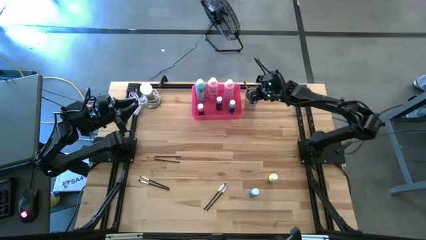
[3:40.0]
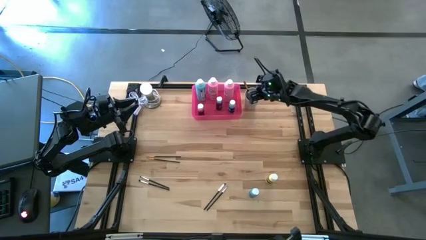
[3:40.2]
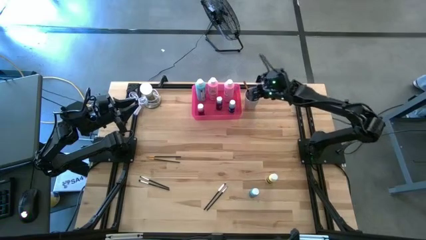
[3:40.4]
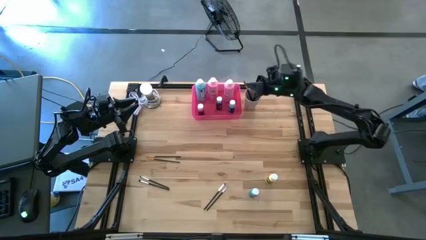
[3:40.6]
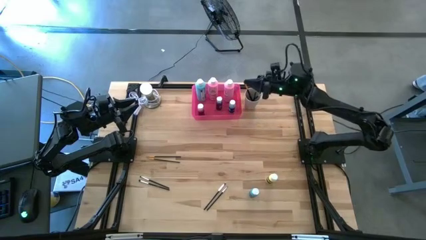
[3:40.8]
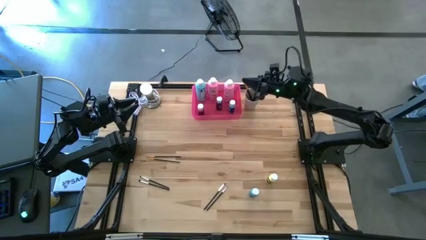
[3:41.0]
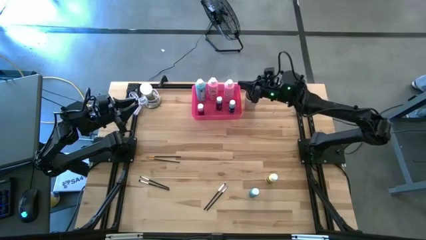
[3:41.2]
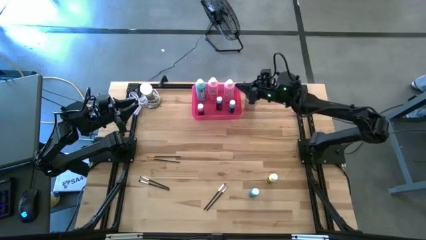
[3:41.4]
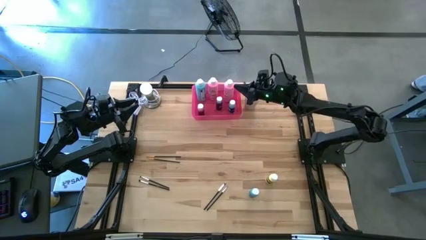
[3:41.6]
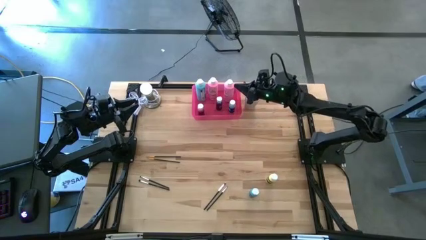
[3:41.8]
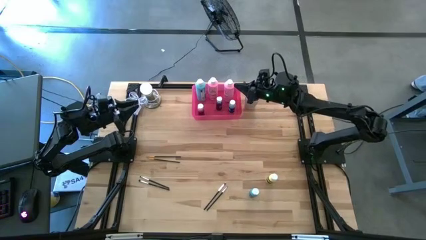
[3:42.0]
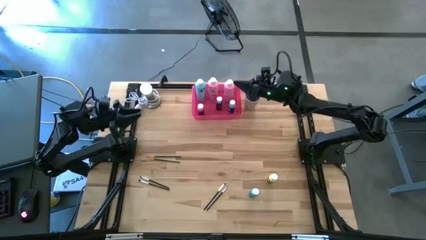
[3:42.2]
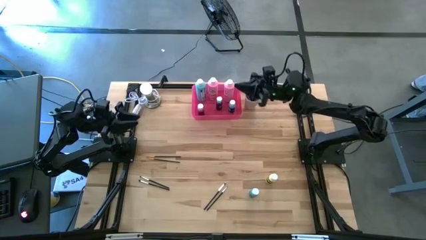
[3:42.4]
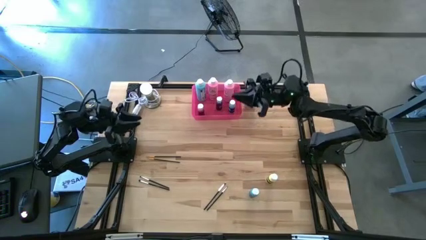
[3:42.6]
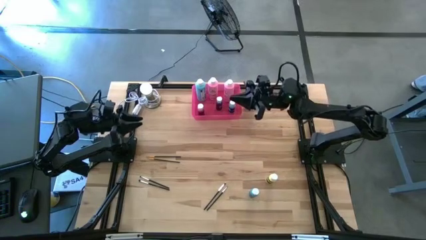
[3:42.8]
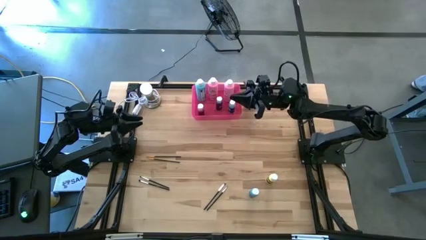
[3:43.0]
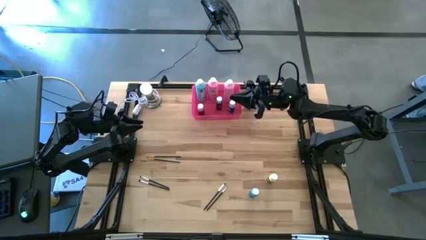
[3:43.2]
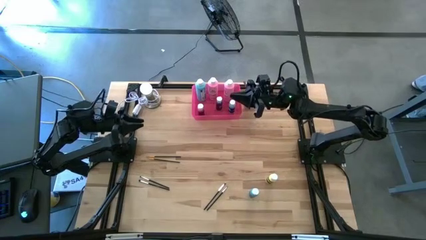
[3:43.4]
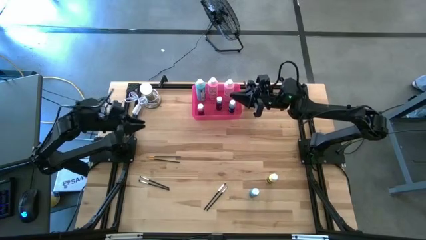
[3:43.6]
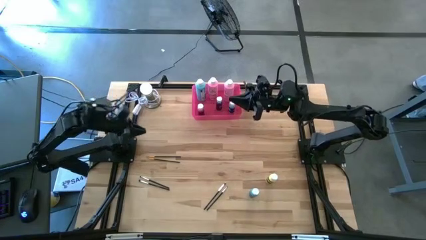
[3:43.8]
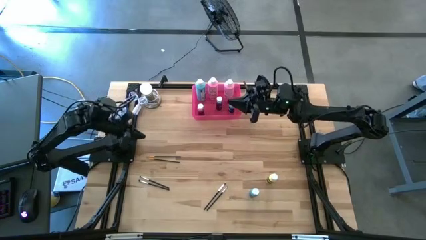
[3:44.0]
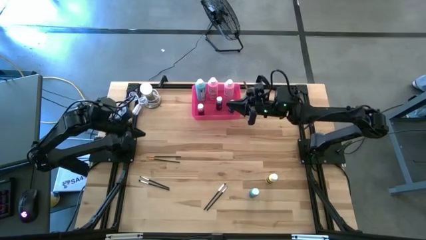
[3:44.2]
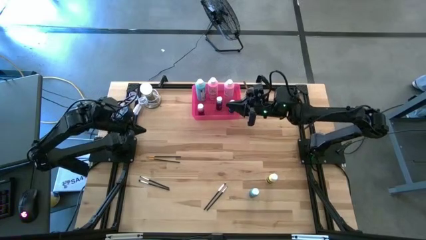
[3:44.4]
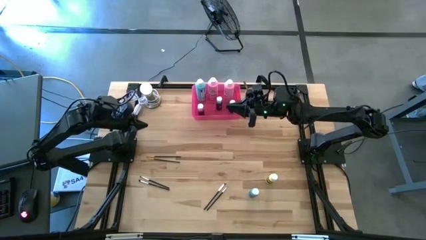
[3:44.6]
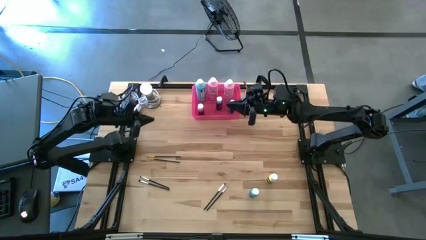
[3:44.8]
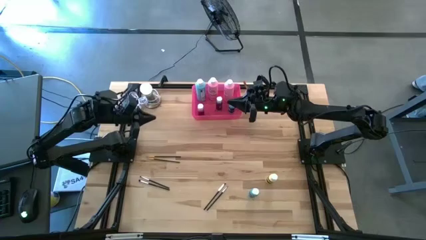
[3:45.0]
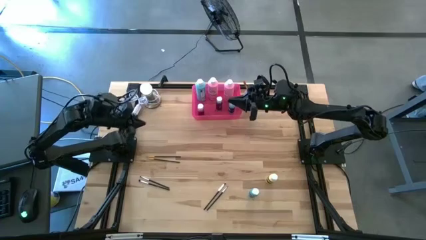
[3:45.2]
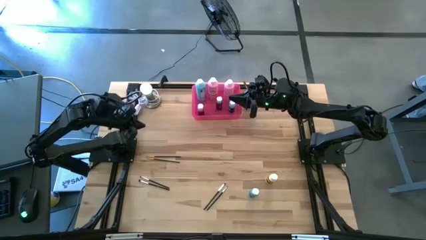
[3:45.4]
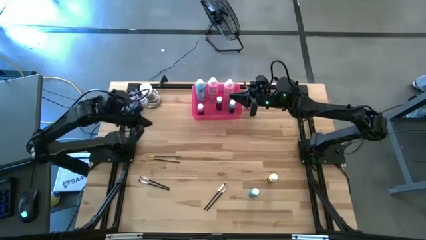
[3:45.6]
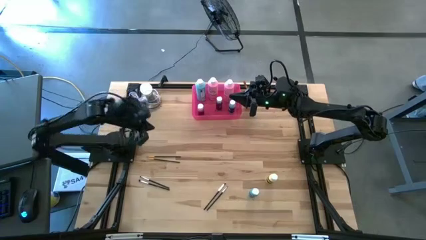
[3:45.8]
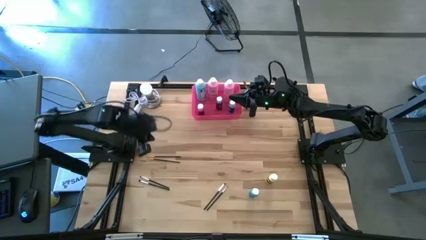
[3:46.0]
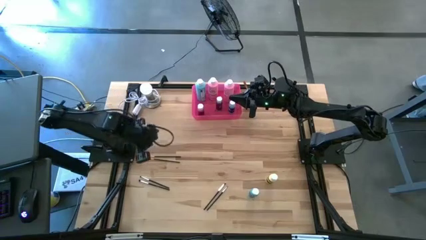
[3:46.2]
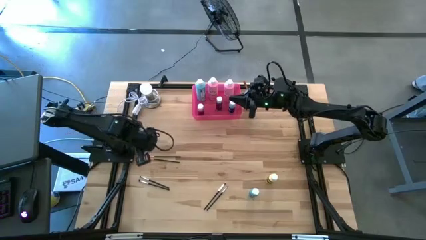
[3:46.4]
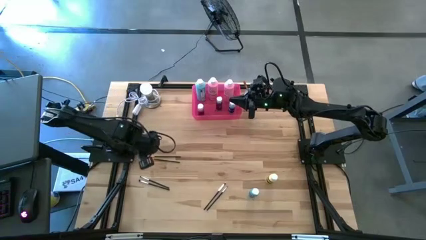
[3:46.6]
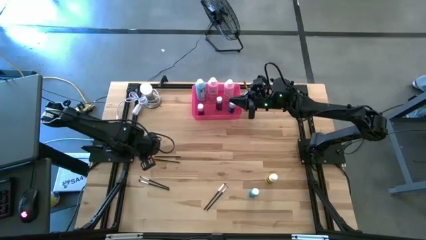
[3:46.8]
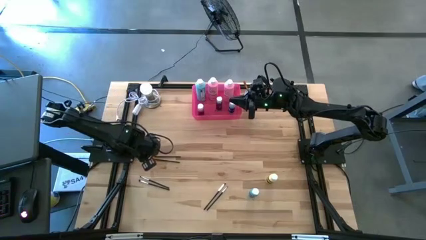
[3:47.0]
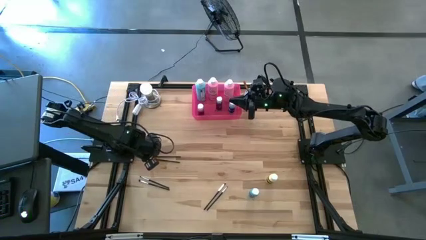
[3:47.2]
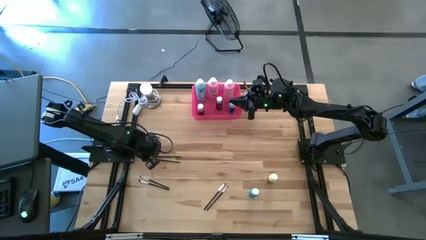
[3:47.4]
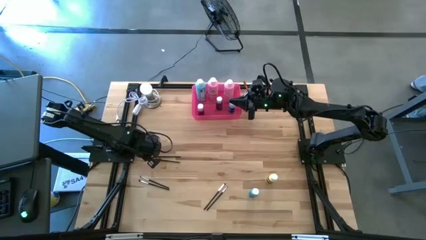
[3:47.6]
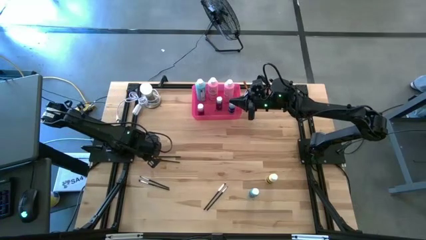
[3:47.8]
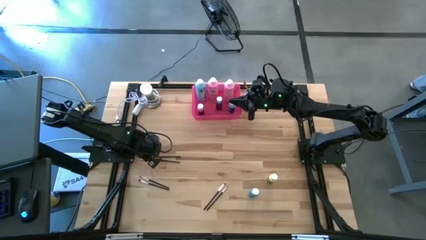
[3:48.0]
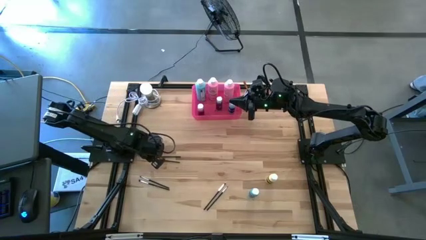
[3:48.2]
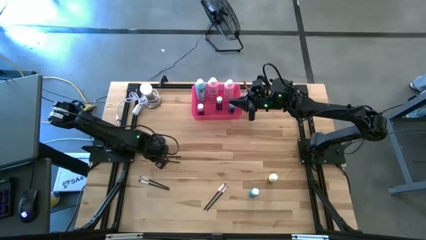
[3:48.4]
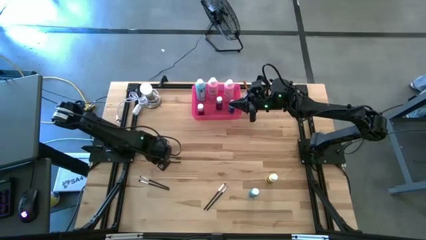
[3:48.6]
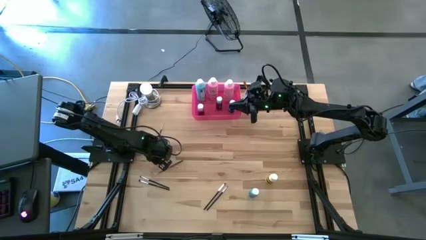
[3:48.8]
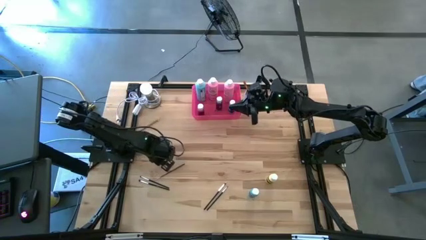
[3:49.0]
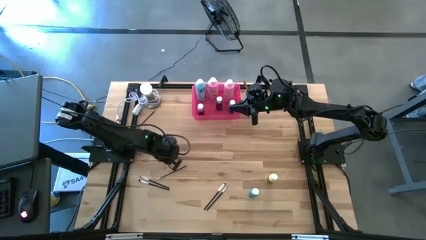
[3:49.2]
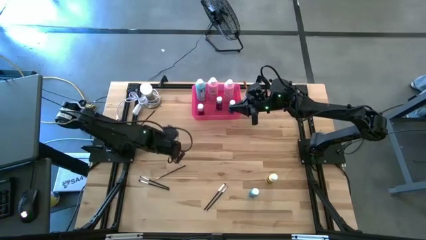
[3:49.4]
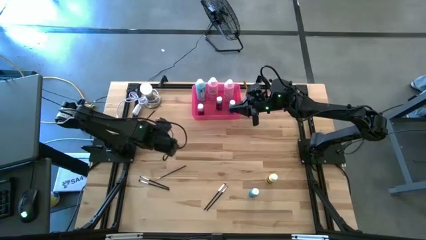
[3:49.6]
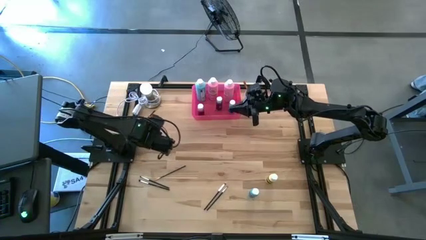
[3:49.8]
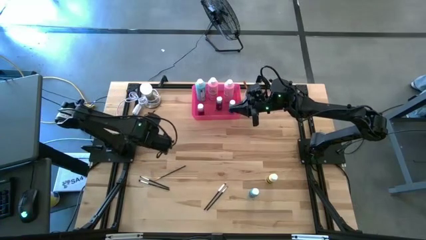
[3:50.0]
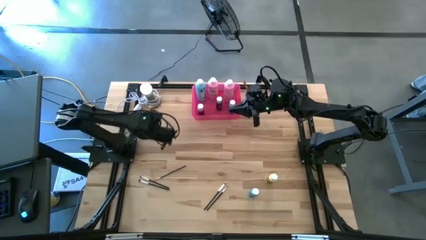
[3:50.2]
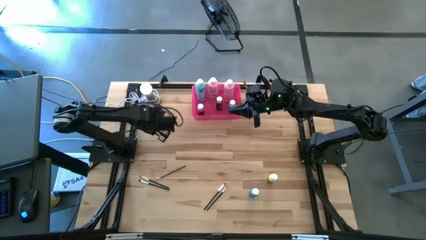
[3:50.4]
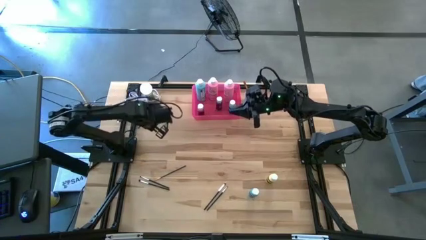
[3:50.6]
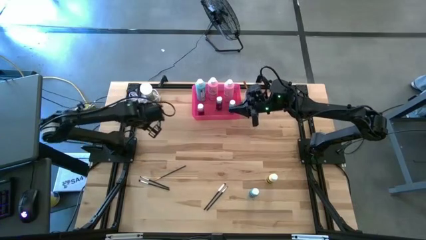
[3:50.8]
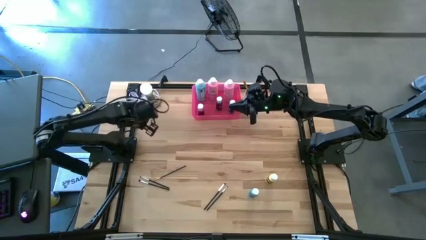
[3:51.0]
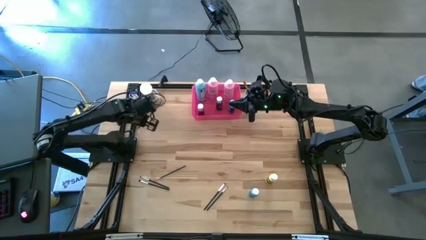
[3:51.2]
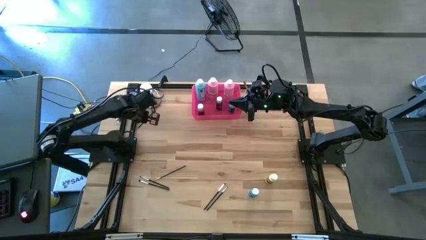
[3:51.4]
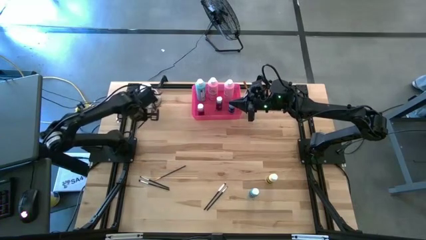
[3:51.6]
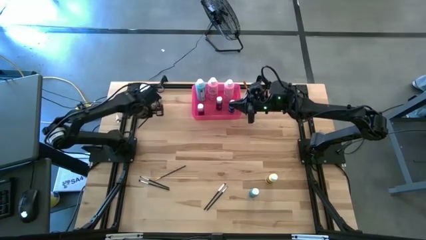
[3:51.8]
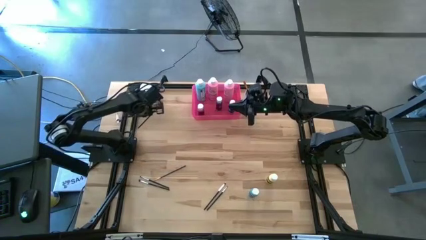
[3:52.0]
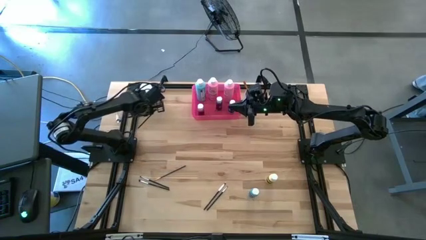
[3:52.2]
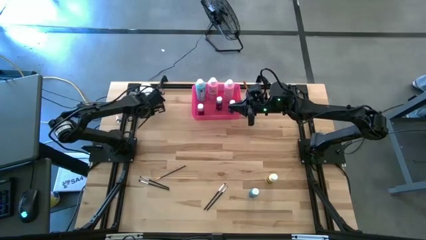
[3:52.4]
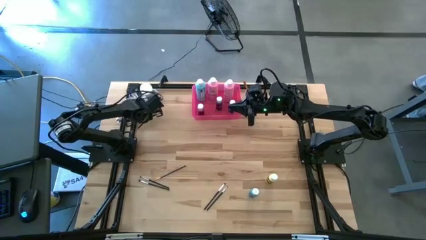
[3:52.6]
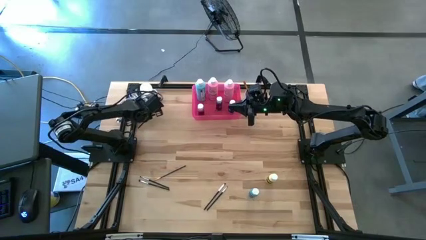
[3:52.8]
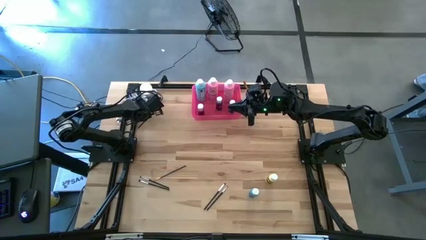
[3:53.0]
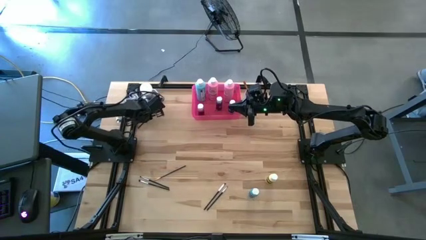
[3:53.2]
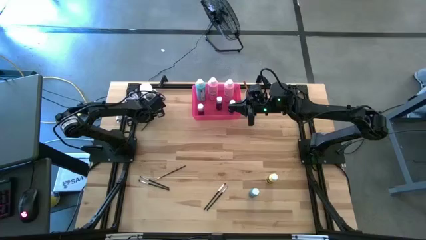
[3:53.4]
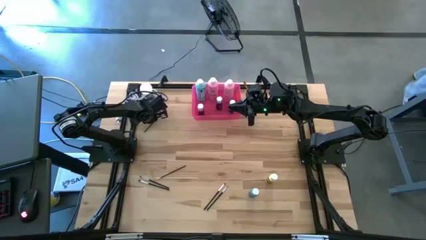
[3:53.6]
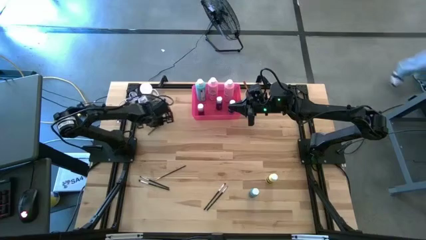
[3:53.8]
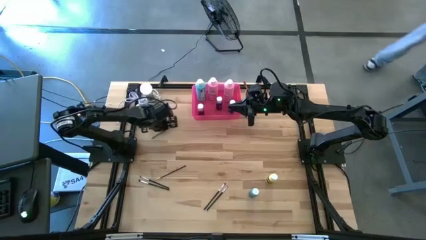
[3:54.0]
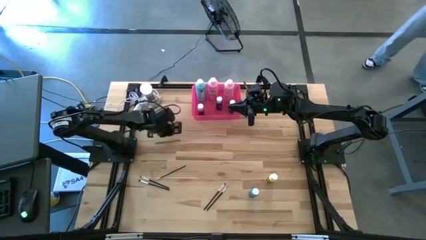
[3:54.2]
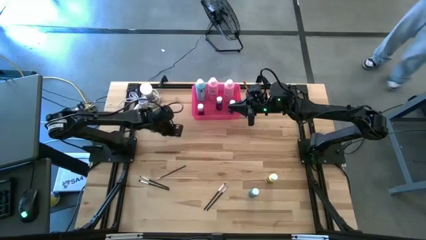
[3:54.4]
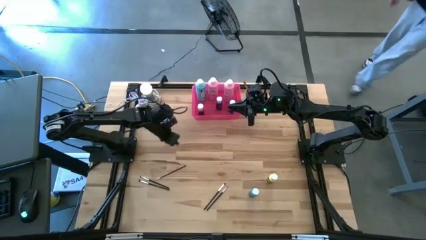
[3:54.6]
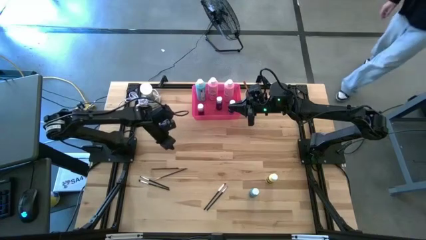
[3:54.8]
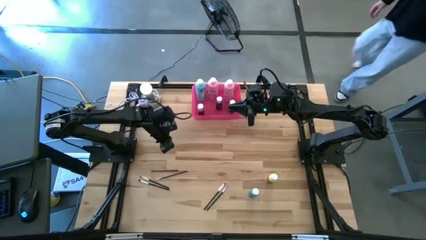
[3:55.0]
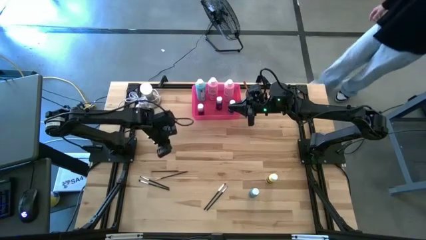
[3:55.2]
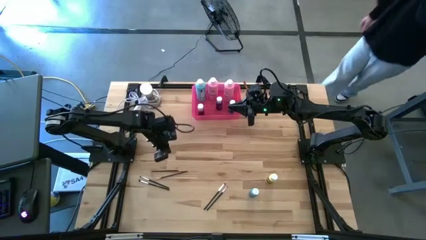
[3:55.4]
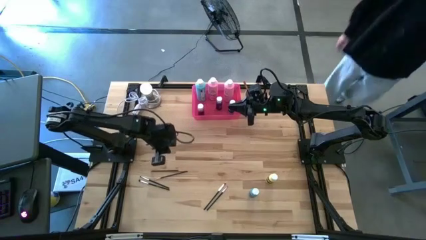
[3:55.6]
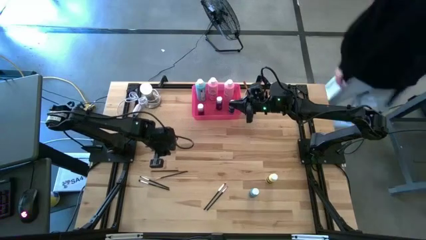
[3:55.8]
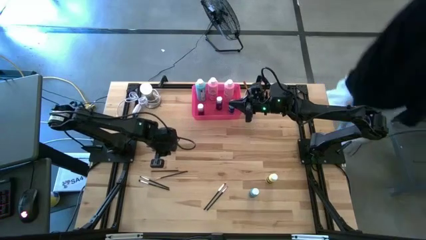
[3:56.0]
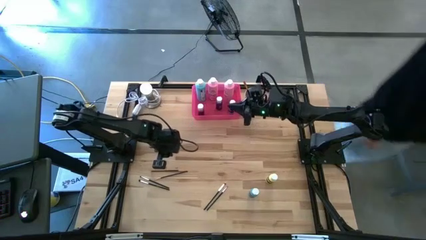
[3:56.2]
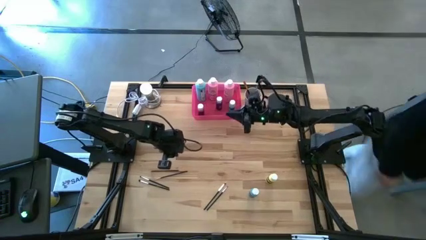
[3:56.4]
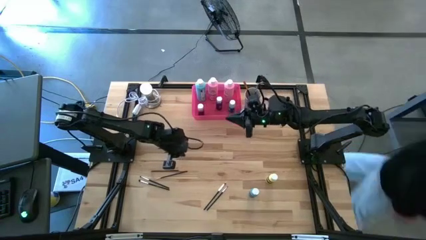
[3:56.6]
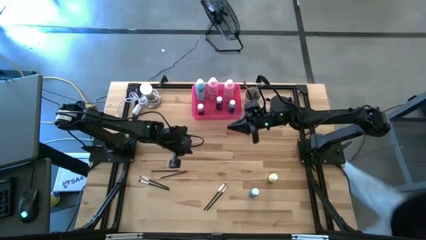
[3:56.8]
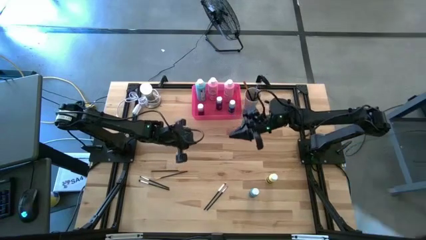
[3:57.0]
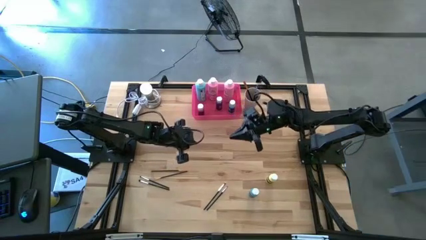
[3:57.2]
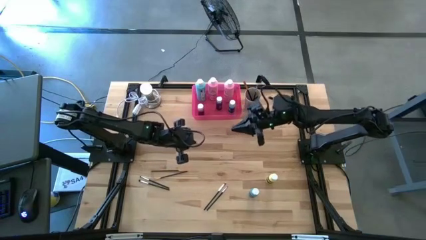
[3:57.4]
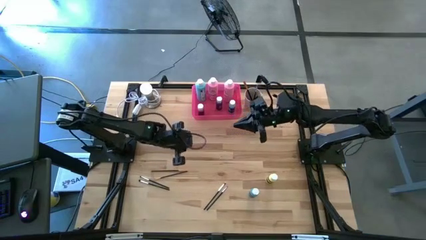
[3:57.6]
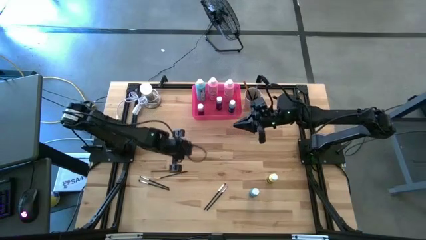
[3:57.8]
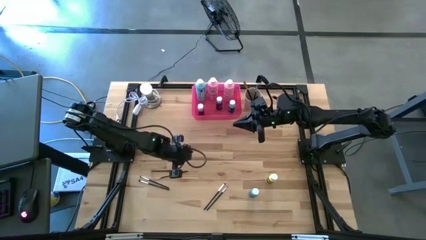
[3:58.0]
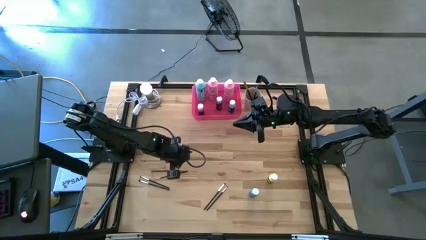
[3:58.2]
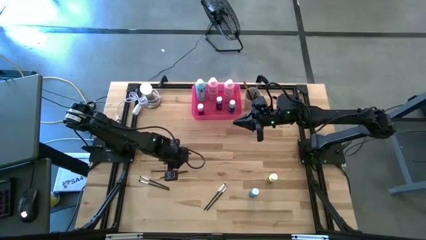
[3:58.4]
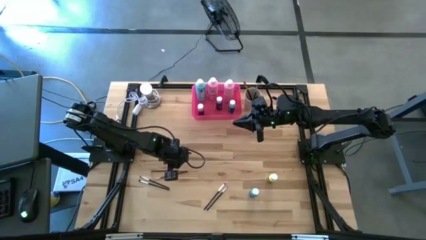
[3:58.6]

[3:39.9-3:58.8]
Task: Pick & Place Paint Supplies
Put the orange paintbrush into the white cup
